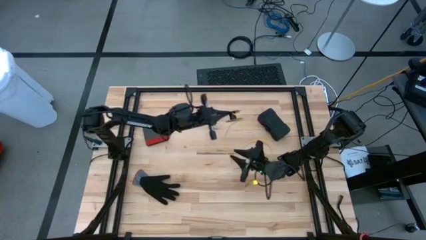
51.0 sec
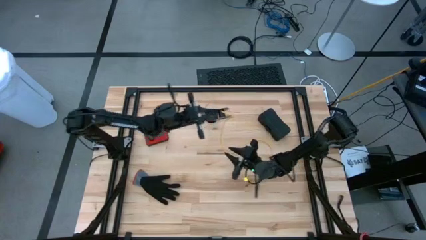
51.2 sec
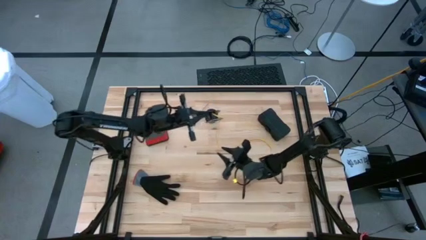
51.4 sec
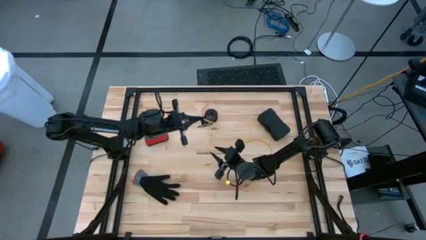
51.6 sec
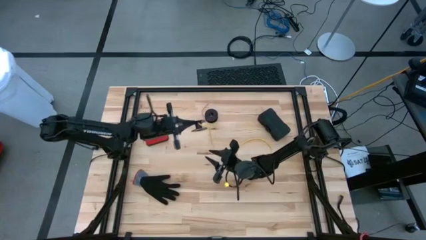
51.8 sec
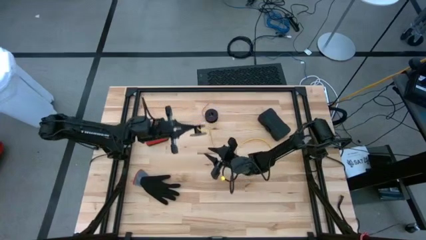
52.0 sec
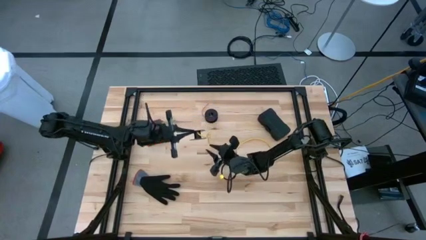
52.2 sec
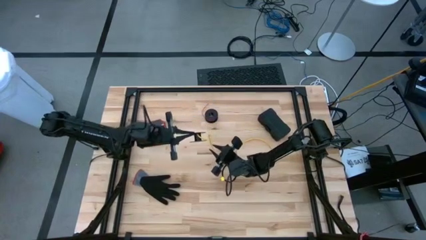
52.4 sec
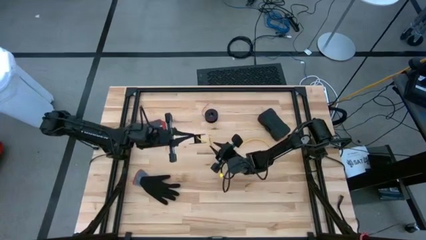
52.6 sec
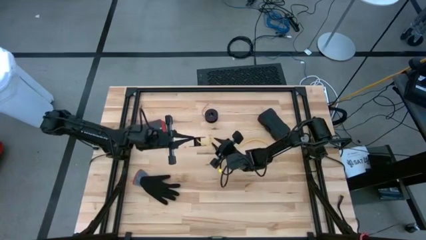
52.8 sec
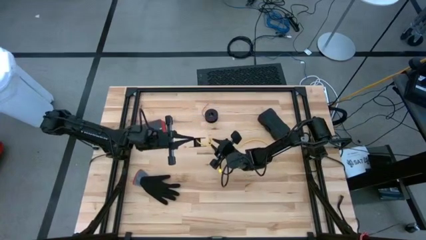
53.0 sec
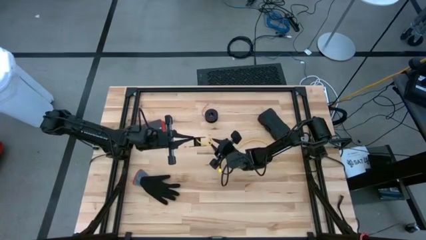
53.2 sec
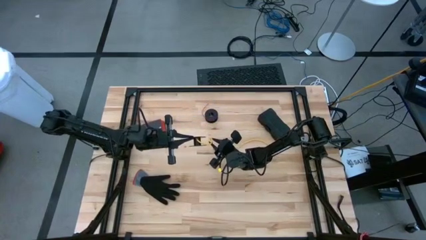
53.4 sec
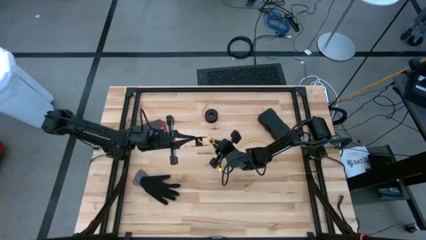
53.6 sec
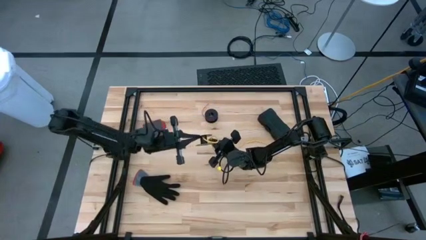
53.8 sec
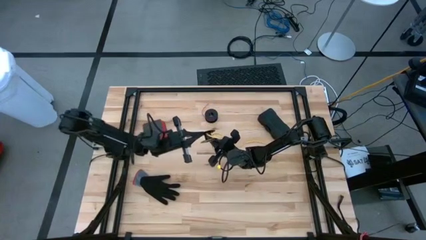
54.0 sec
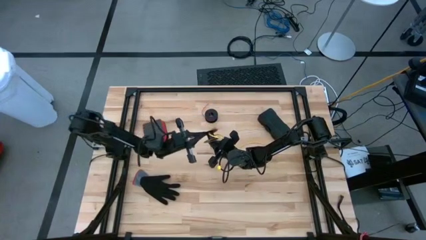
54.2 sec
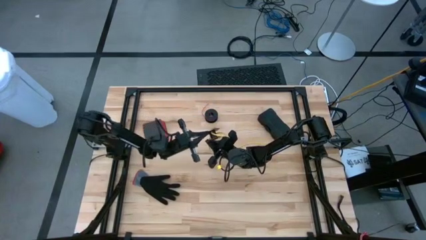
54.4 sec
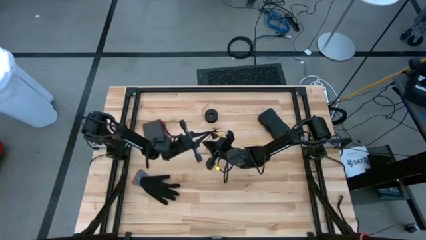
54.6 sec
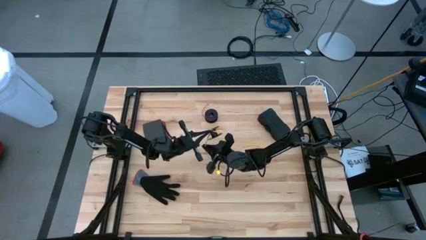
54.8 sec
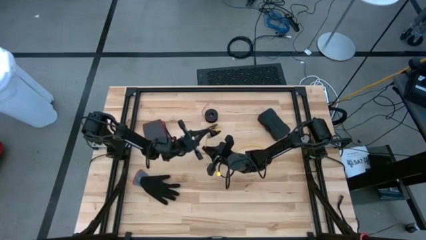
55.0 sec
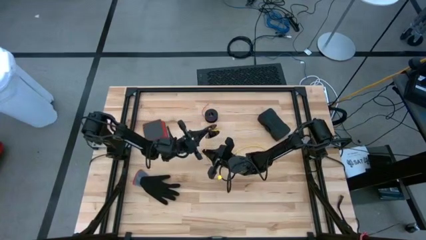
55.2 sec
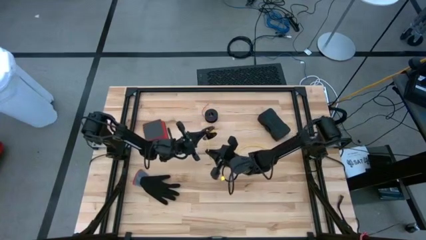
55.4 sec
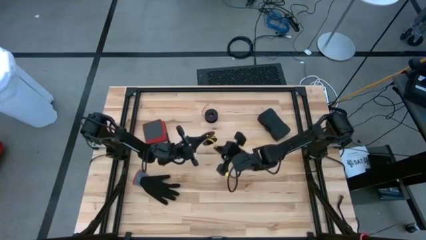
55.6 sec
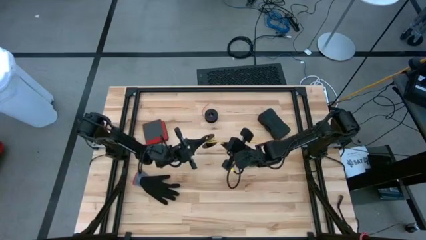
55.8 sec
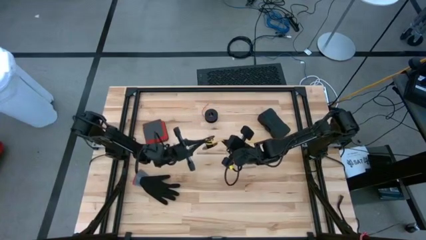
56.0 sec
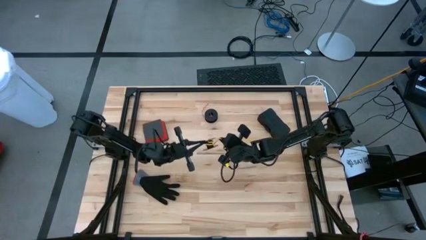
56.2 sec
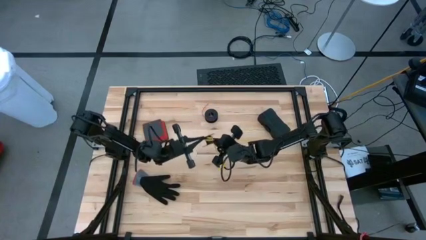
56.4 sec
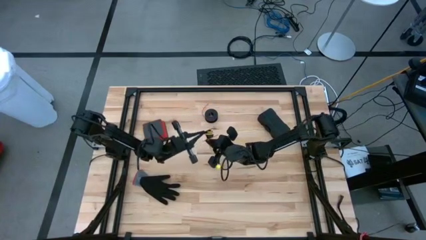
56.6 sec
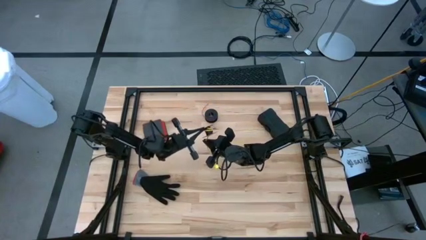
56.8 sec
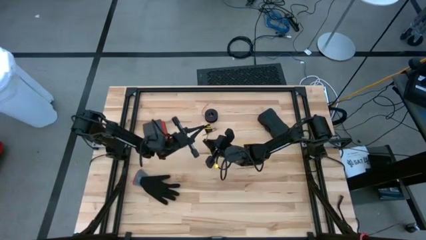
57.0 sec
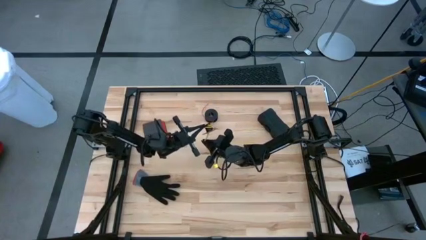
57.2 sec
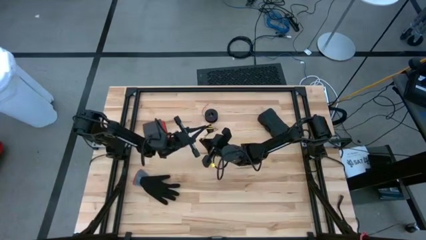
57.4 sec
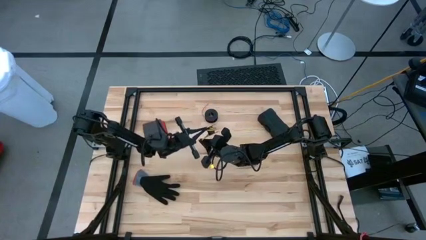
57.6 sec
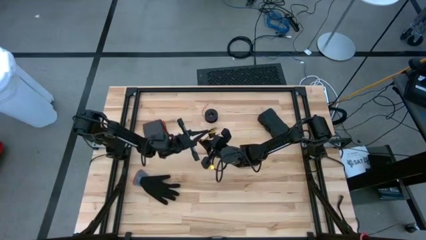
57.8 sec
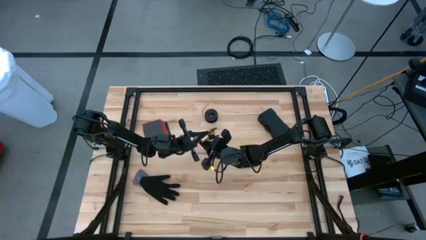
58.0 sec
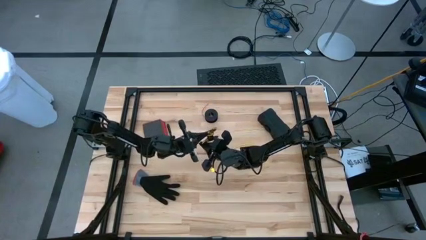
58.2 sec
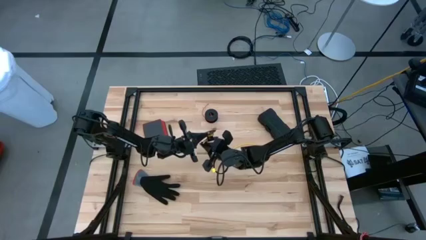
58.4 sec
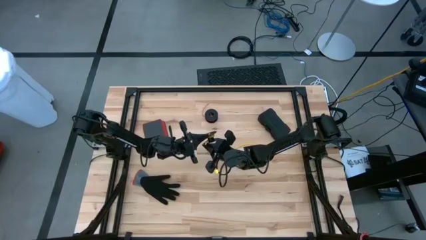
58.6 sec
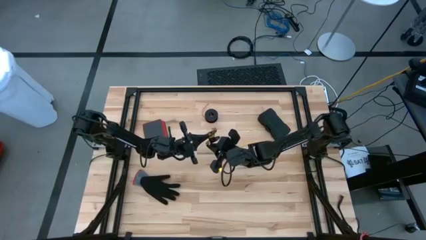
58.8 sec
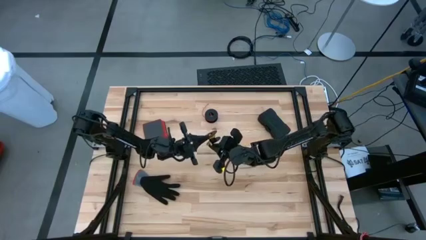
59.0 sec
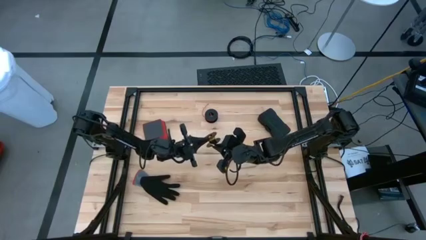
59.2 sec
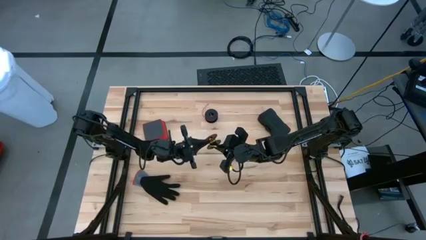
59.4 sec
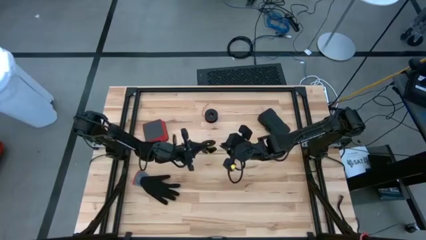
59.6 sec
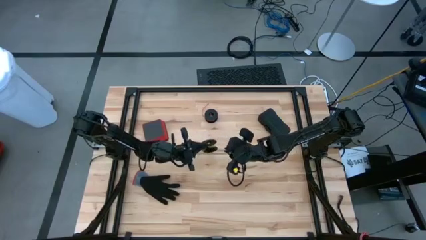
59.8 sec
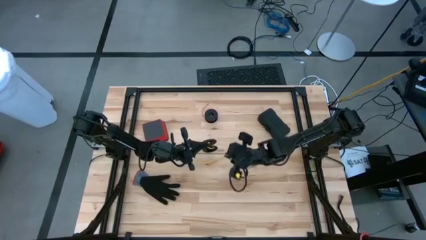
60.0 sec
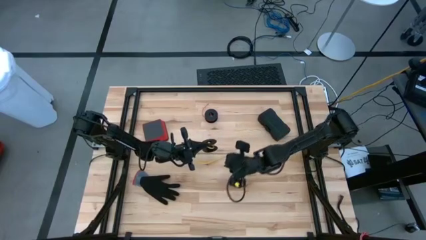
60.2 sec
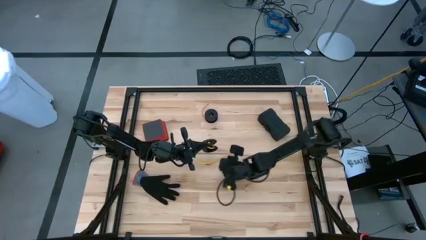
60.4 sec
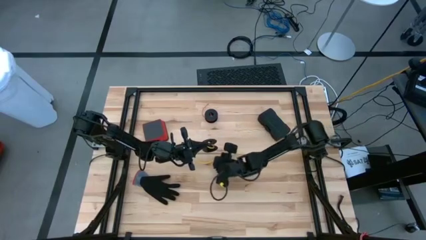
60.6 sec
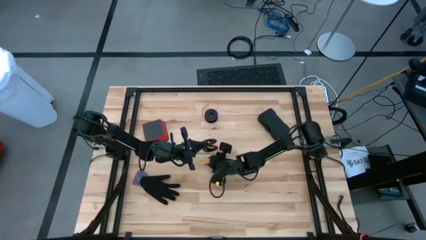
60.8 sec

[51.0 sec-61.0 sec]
Task: Coil cords
Coil the yellow wire into the spool

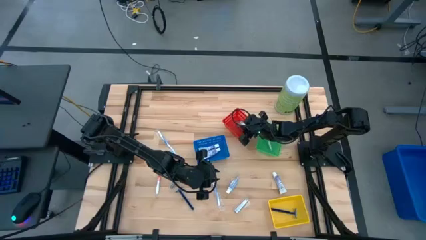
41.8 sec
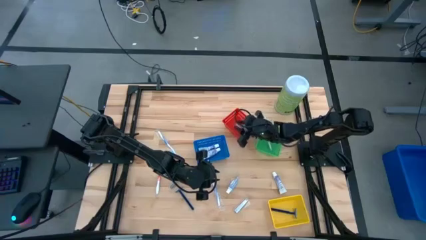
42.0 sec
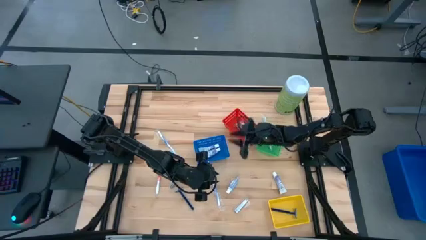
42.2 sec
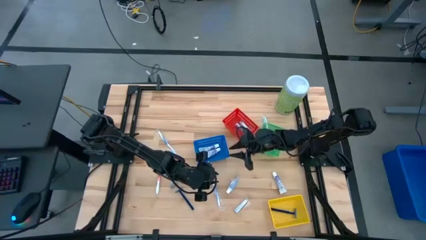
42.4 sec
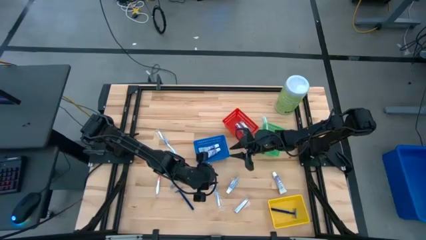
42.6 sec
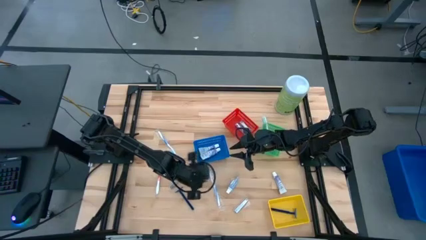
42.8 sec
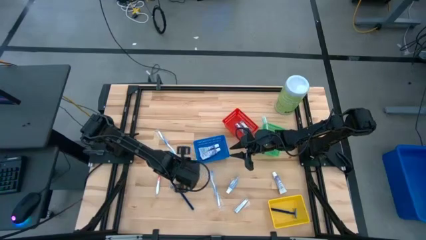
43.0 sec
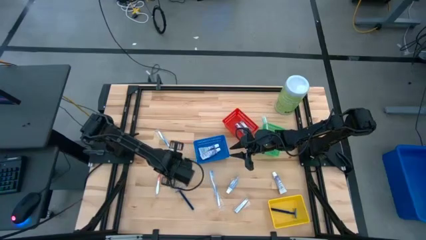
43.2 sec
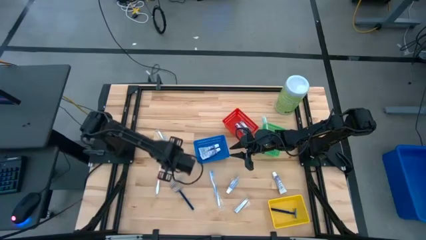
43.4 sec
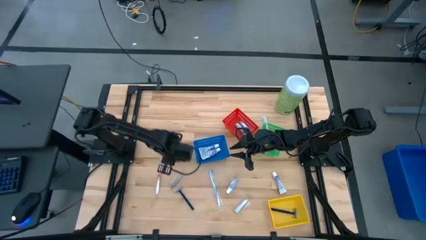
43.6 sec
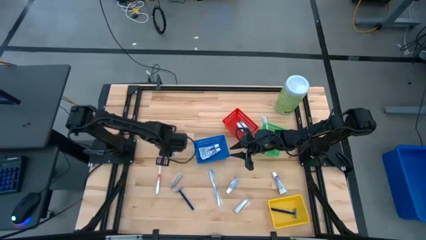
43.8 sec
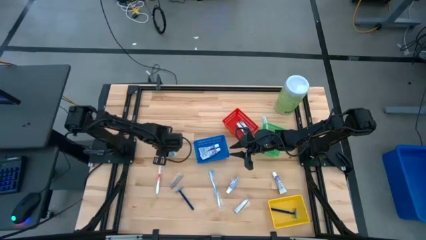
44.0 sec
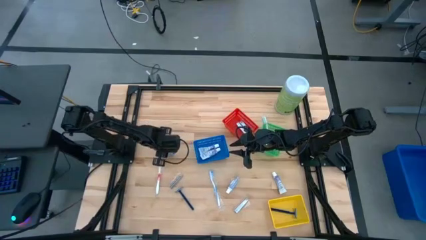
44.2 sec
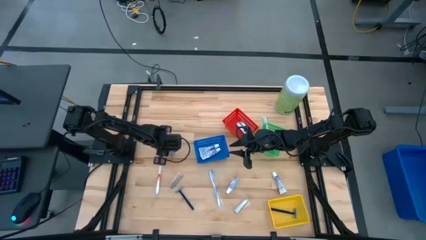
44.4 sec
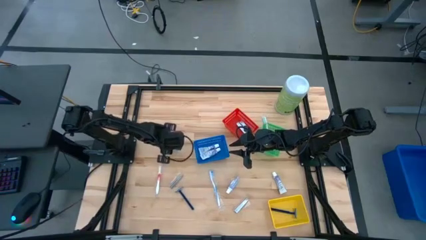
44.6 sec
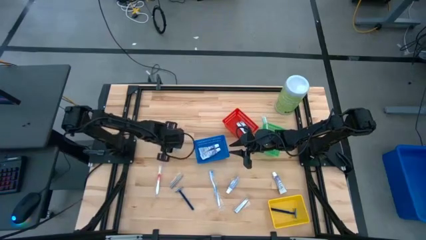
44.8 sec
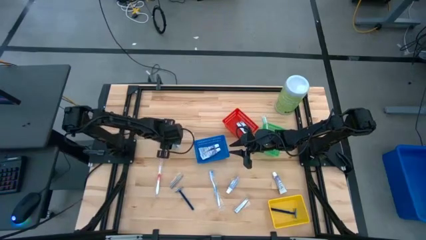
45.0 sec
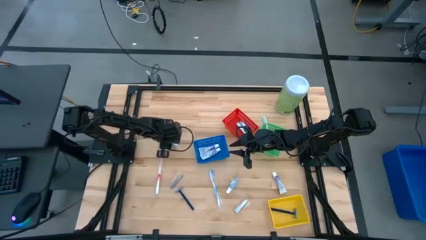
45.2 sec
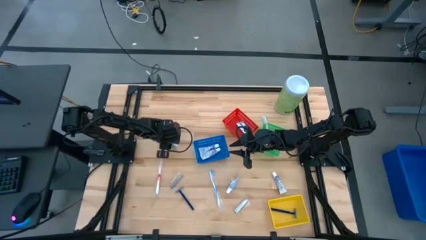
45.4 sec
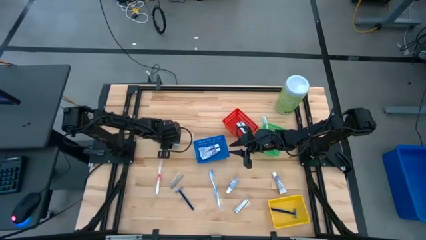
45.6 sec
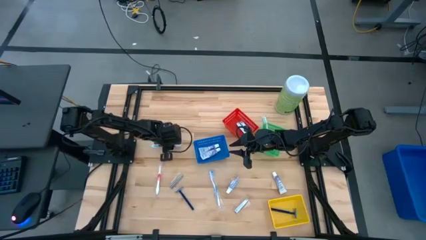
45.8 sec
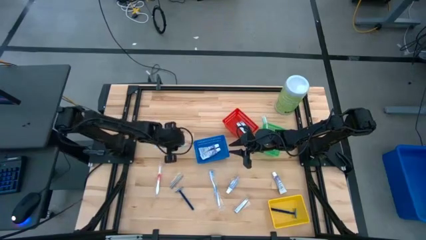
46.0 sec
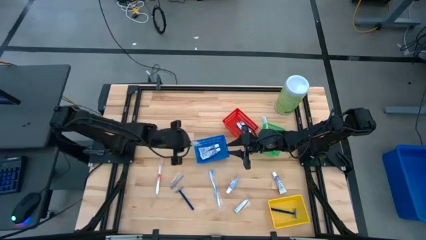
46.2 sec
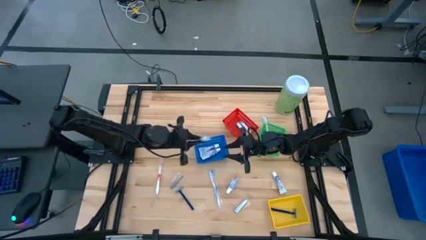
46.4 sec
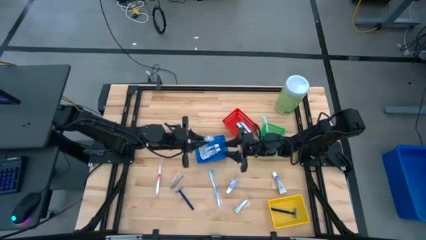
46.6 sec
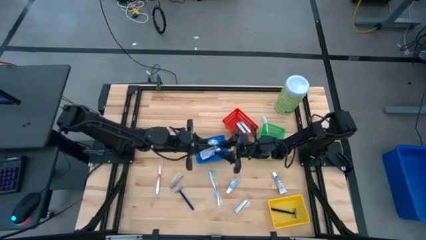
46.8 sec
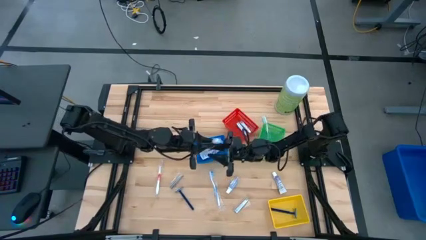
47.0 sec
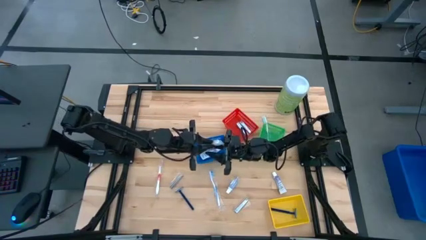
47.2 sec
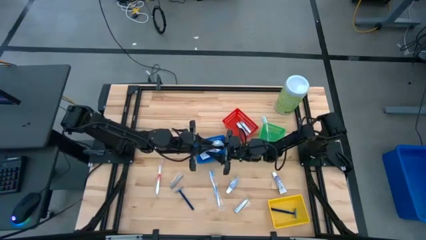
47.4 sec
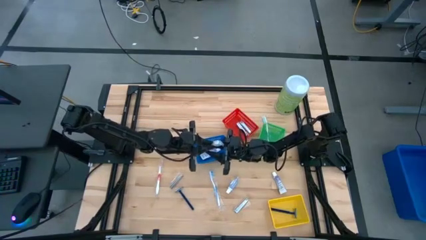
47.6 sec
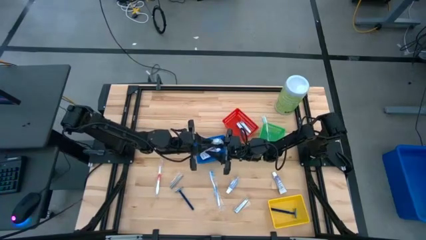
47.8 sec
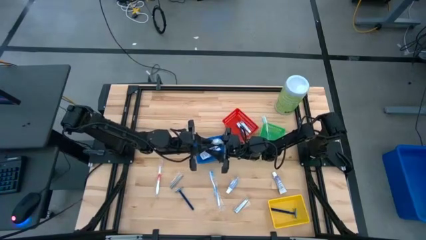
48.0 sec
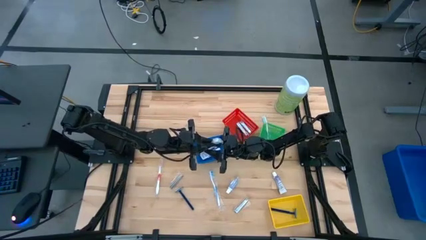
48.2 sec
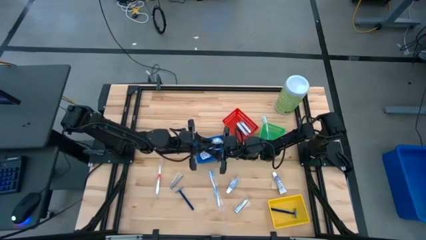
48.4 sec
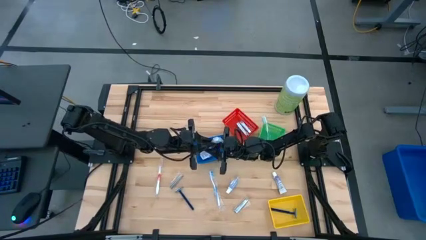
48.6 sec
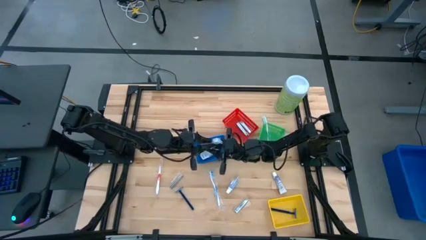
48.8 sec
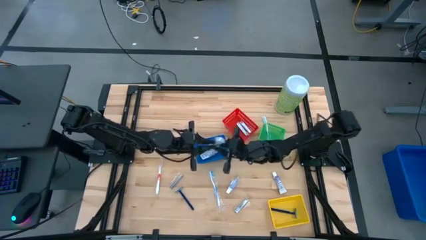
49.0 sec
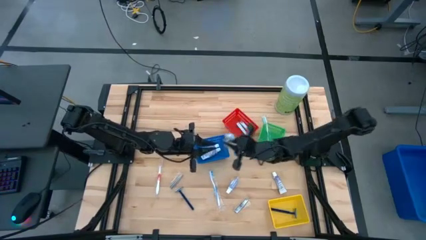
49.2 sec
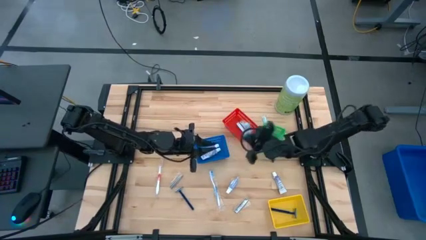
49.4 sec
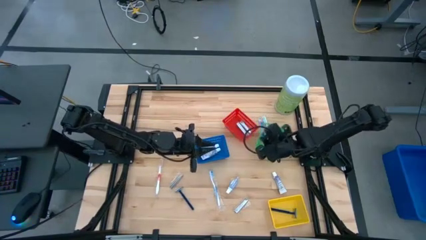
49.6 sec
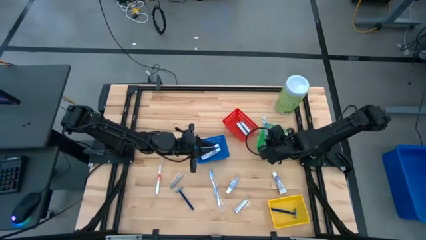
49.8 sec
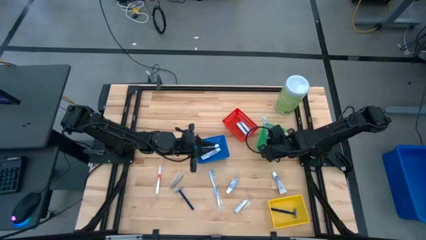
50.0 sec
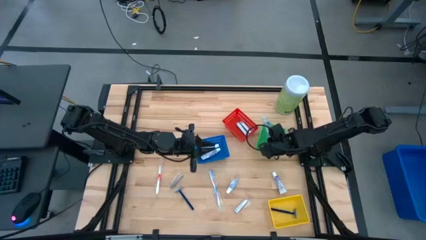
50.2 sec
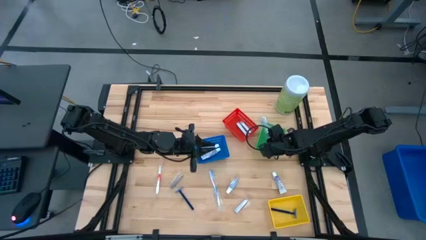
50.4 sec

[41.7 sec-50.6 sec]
Task: Pick & Place Travel size toiletries
Put the blue toothbrush into the green bin
